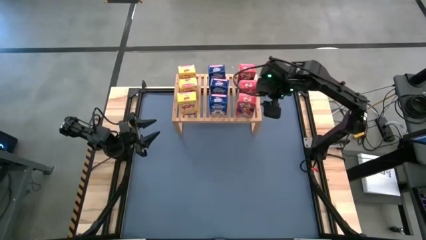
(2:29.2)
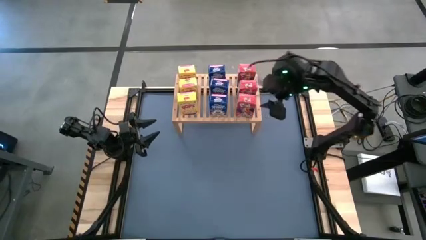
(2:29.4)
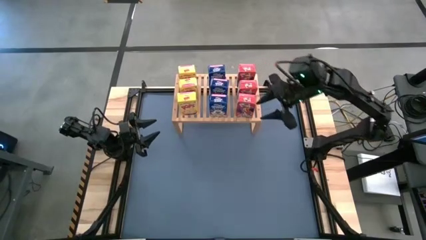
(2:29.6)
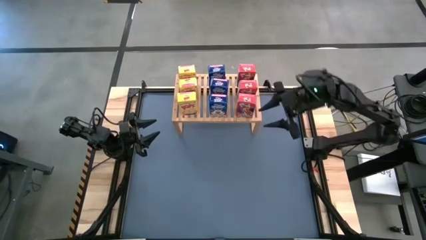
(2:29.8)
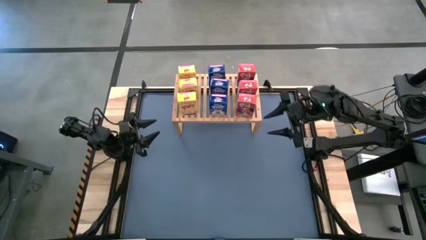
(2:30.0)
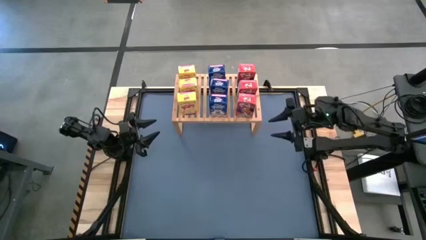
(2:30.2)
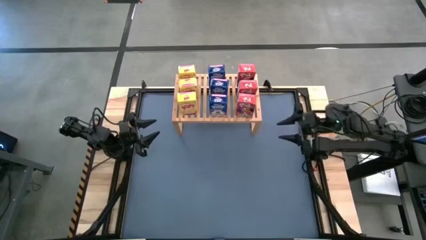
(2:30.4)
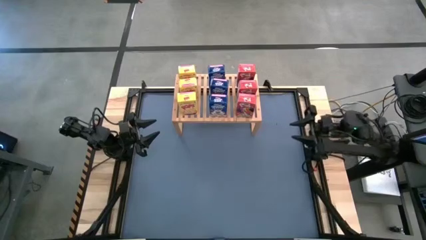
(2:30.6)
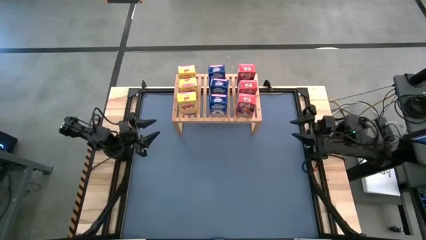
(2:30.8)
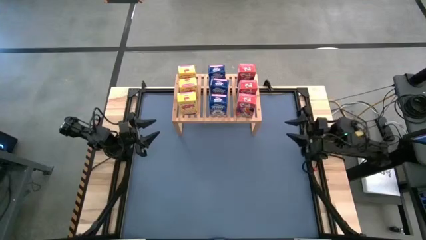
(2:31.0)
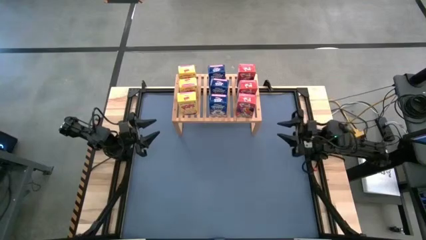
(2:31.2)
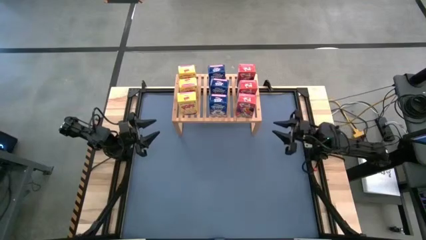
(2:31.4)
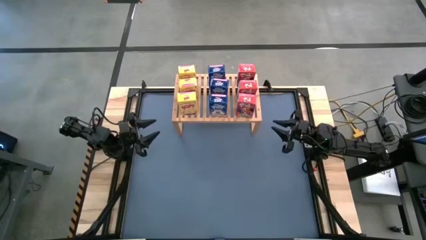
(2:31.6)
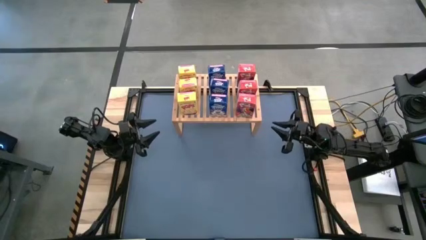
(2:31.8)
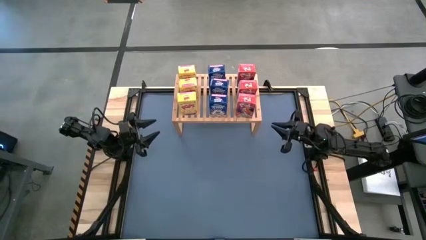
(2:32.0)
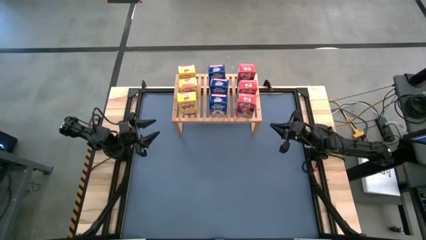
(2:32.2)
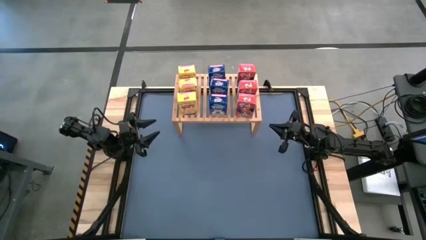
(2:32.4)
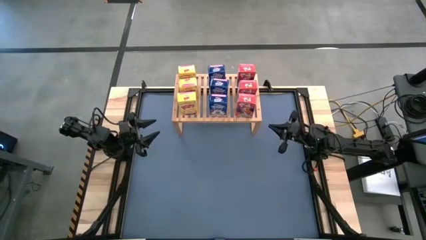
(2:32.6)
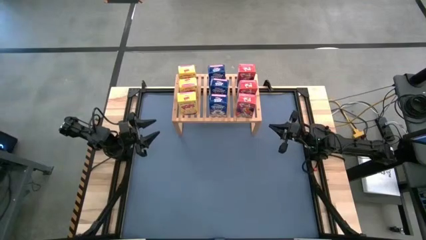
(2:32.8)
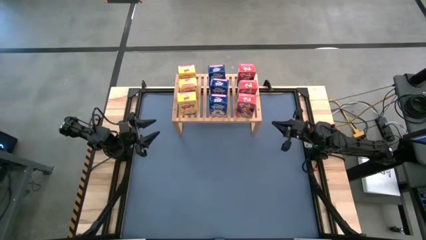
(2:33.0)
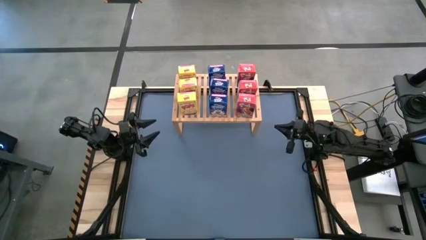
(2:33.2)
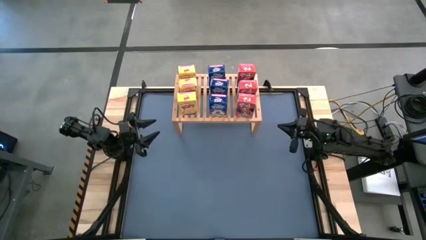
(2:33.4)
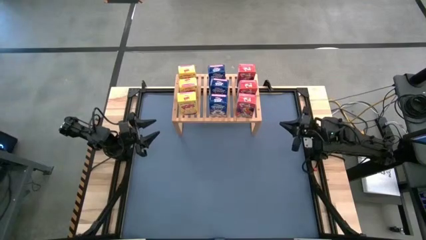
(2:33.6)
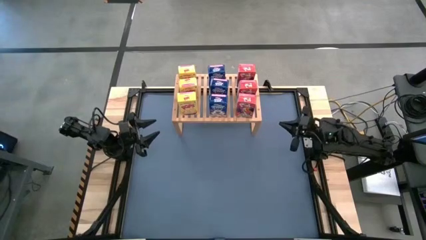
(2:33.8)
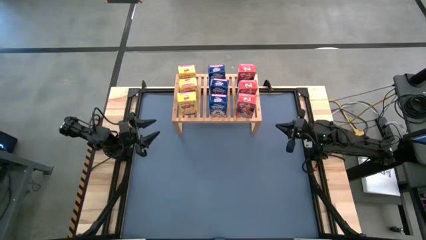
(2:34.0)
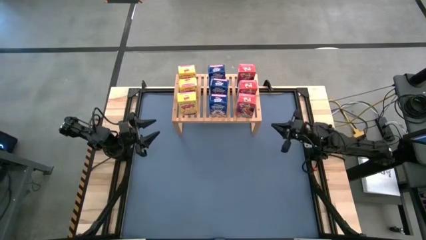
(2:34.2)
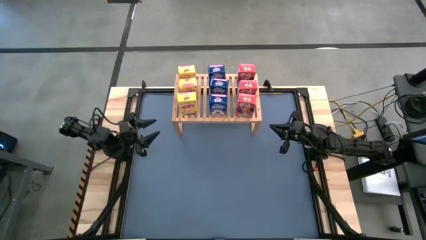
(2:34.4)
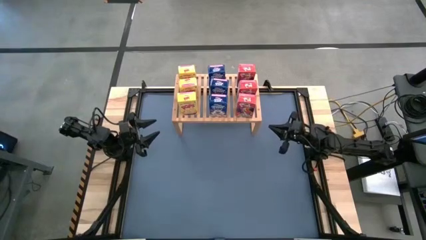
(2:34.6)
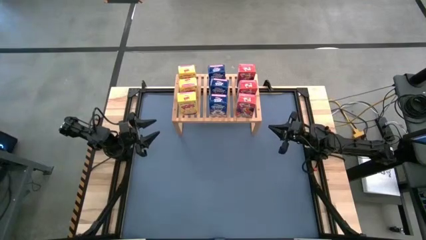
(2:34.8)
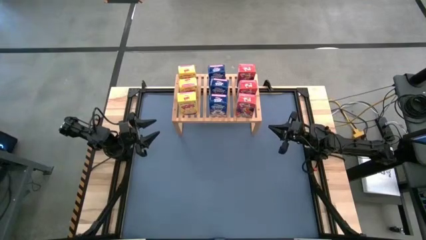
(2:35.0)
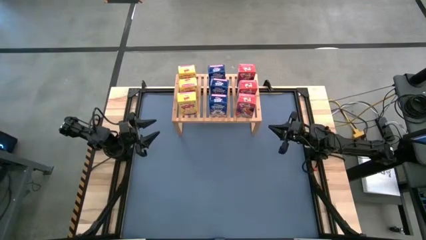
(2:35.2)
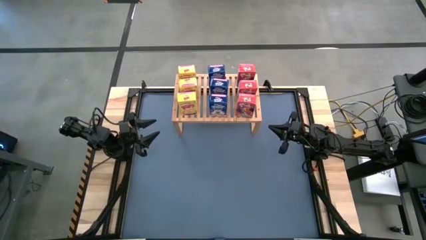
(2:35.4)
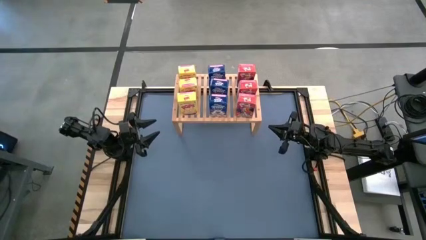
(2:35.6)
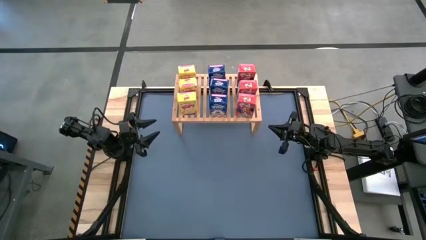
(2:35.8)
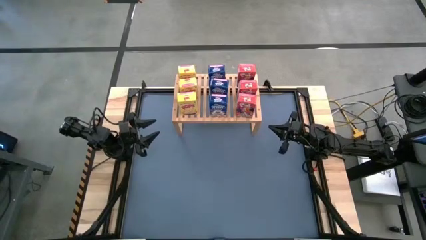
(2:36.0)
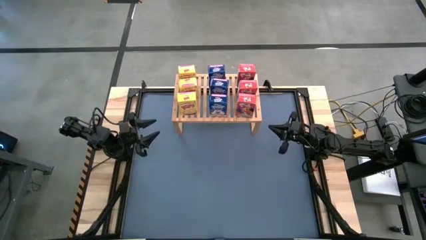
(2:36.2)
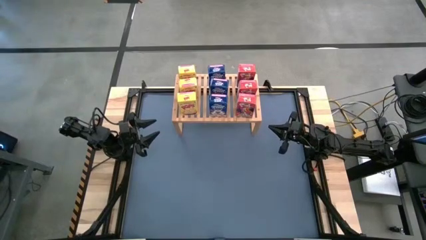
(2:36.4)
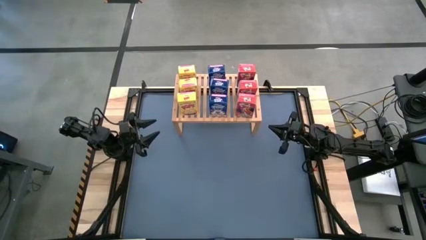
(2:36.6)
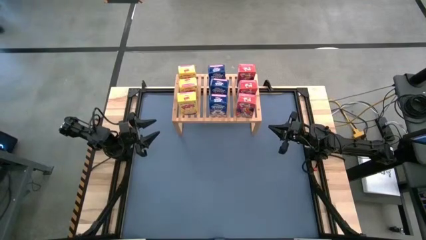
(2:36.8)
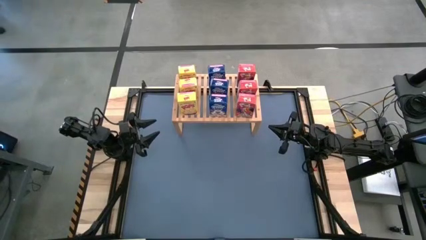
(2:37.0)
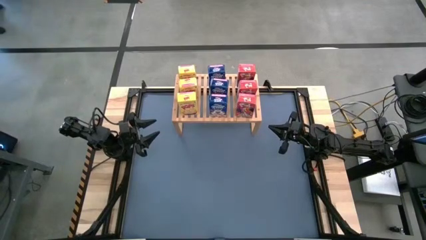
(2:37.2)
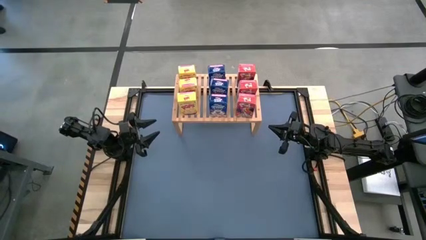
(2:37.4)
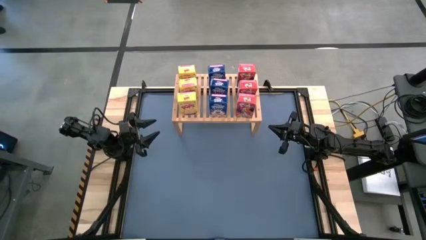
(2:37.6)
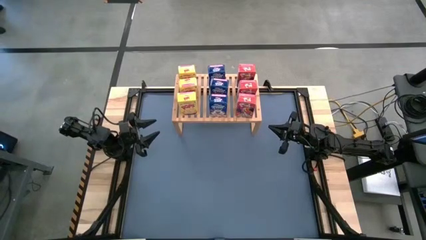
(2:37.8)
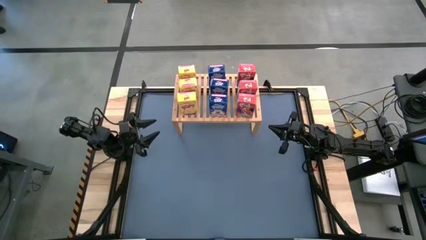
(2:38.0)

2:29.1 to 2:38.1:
Task: Stack cereal on shelf
Return to Home Position

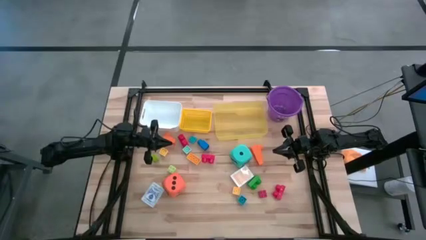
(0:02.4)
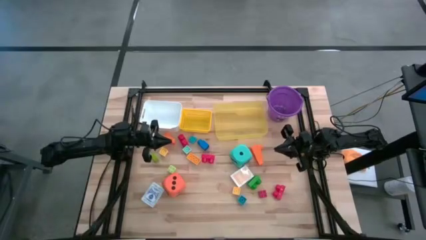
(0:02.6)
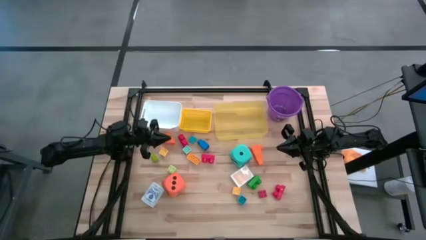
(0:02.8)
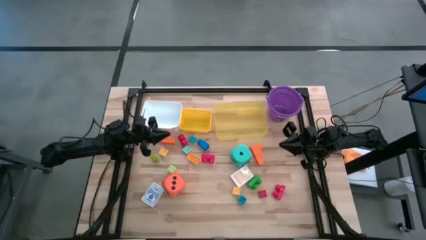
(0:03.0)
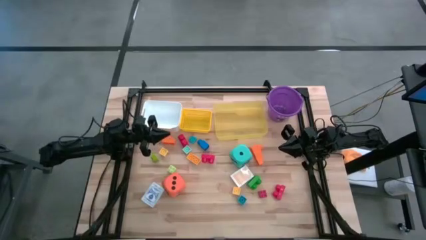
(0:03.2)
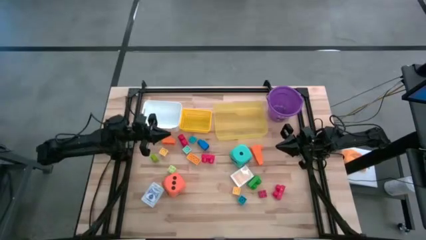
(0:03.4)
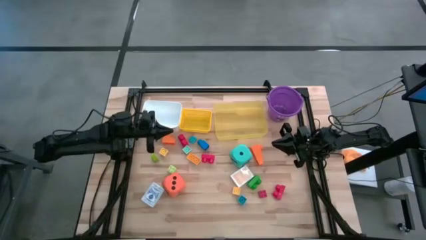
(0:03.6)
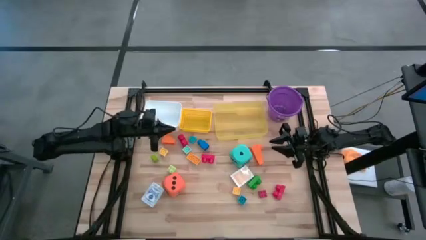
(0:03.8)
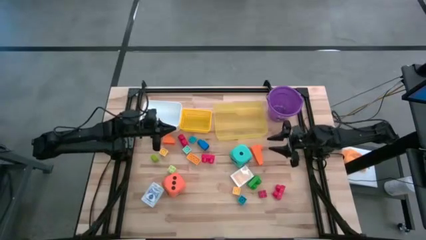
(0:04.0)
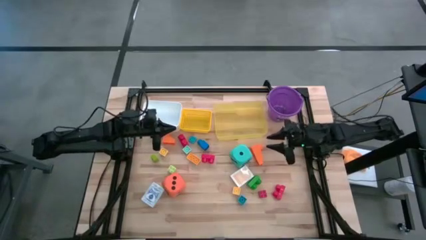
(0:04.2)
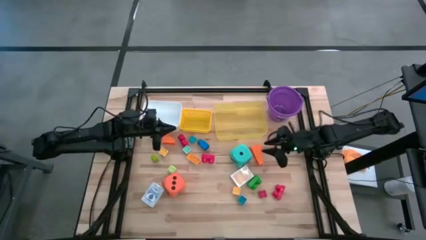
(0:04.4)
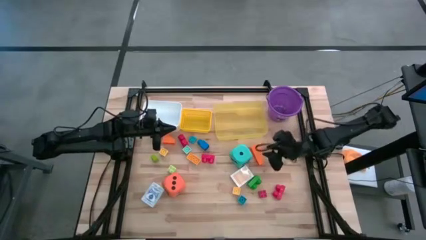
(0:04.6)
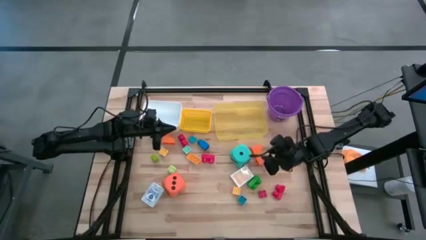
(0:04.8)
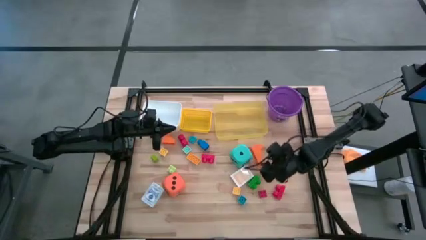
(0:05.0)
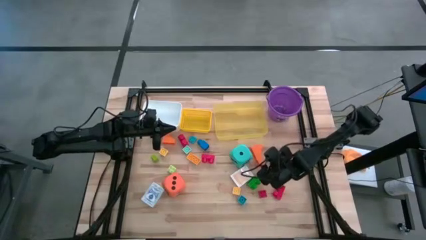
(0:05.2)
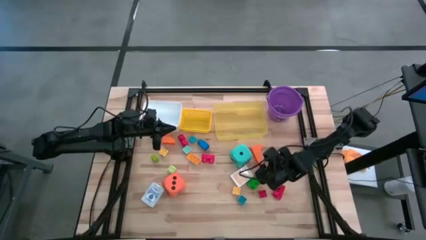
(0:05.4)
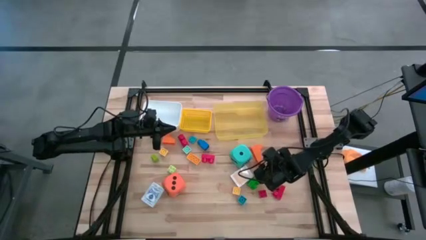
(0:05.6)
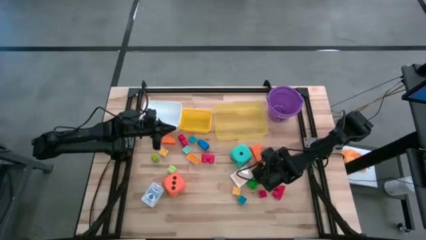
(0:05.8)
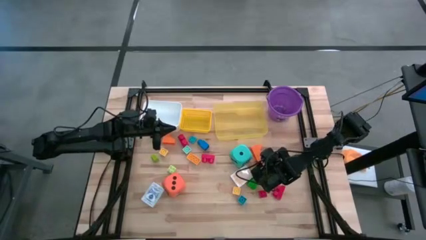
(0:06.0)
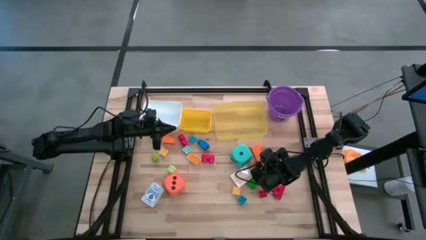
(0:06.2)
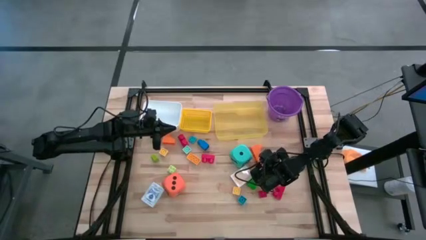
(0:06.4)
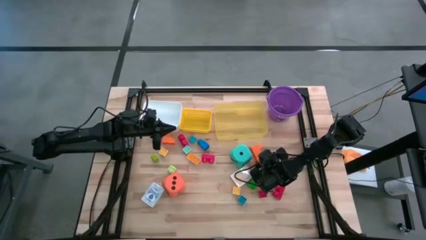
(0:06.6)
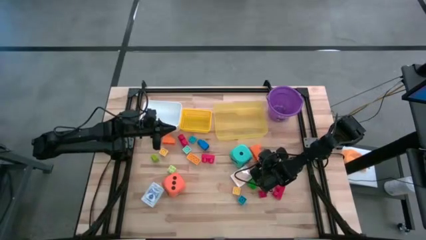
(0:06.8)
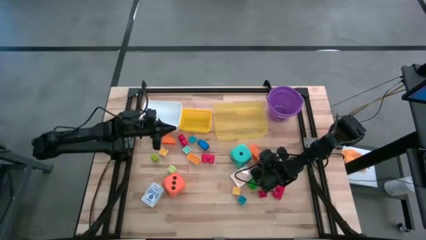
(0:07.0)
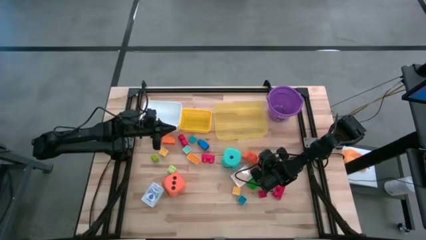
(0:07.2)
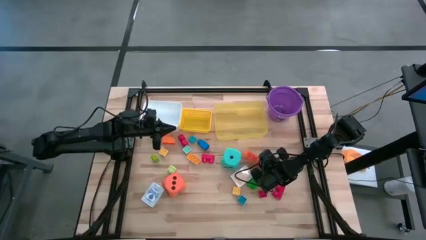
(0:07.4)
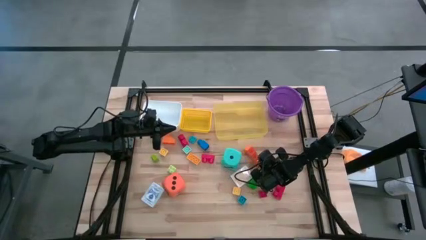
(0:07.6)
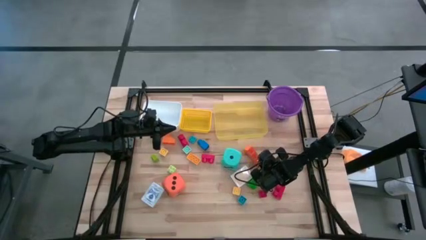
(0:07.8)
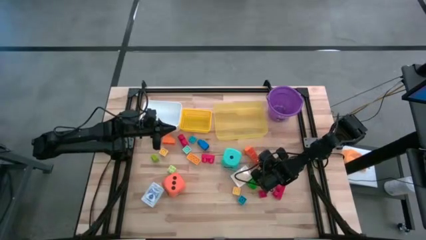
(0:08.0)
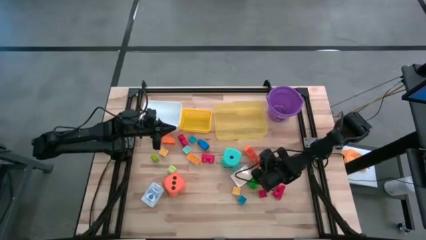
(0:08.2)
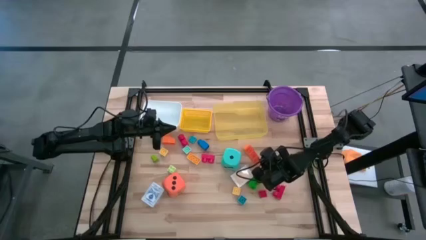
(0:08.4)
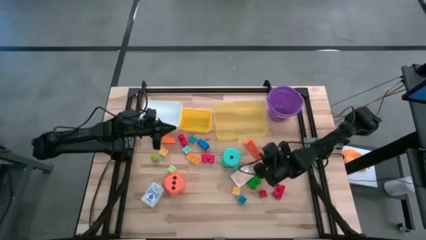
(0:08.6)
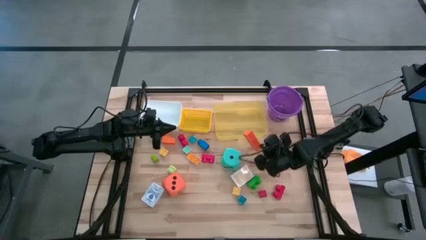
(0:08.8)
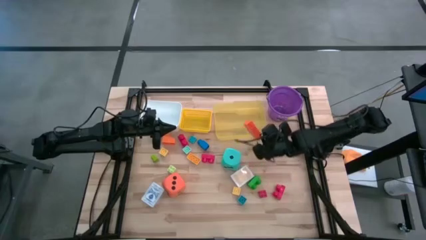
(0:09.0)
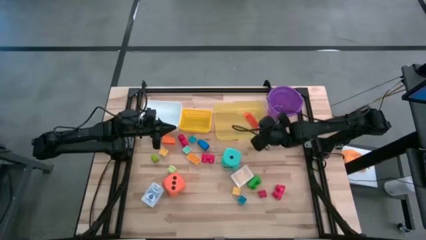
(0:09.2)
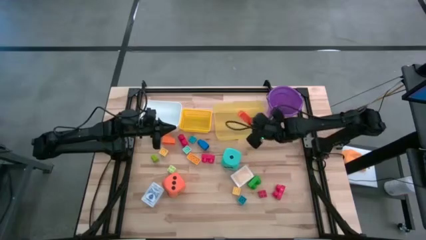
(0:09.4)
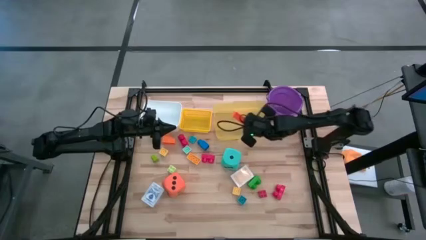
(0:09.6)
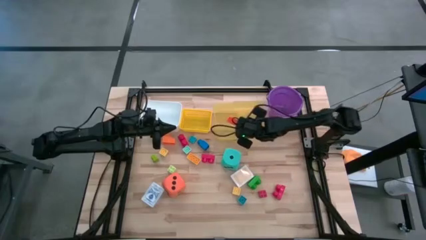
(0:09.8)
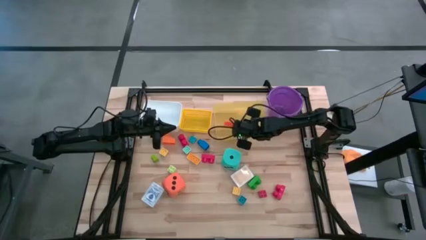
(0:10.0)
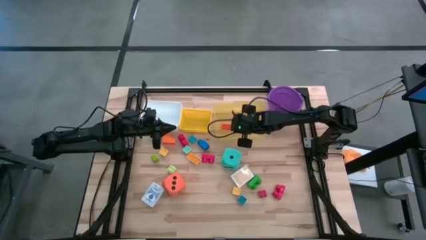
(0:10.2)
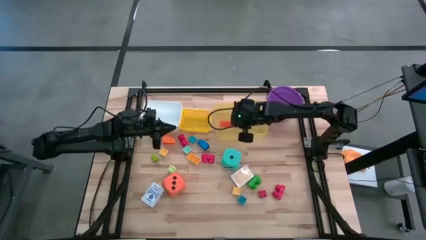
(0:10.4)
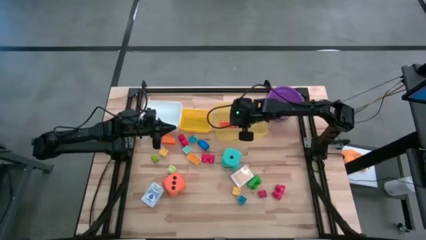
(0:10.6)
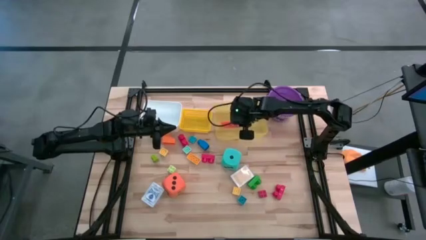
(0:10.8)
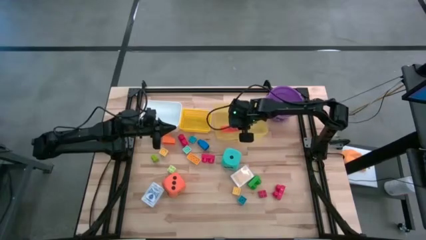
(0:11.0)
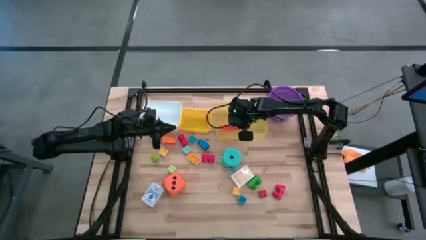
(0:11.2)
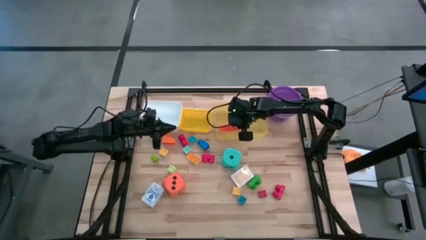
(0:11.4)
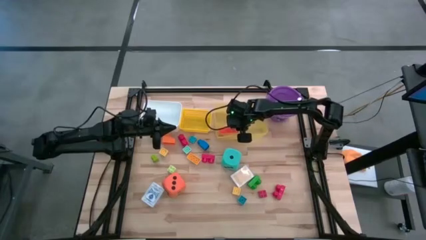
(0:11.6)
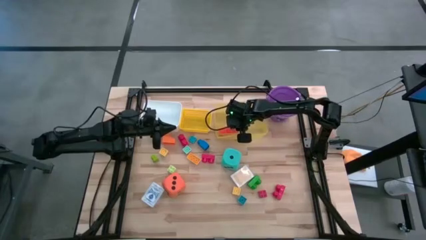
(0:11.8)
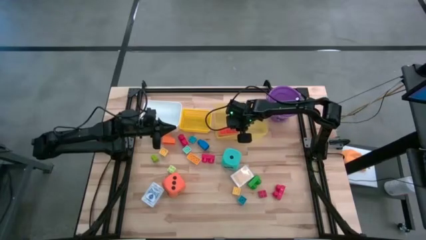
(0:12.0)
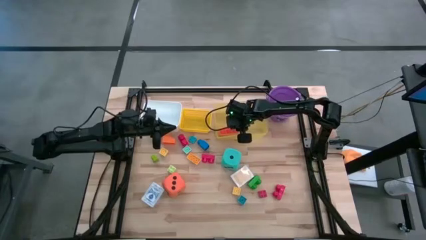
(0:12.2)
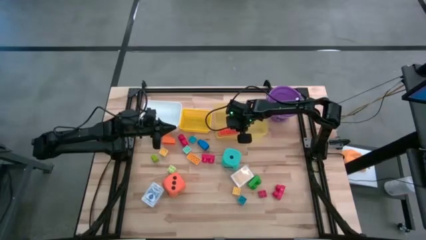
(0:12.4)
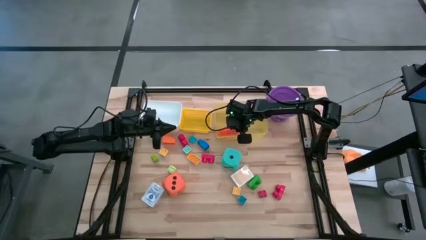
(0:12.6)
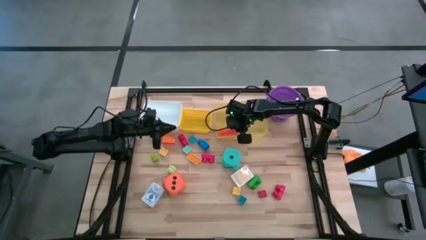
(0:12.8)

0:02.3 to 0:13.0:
Task: Pick & Place Toys
Put the orange game piece into the yellow bin
